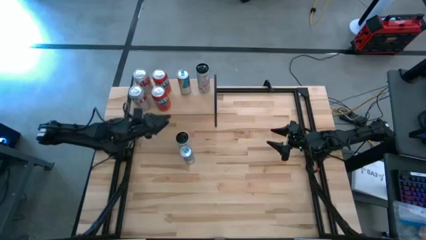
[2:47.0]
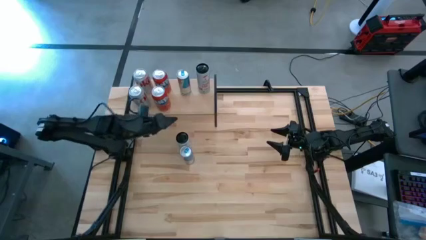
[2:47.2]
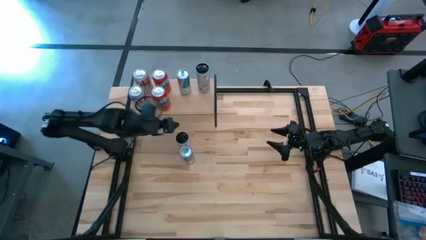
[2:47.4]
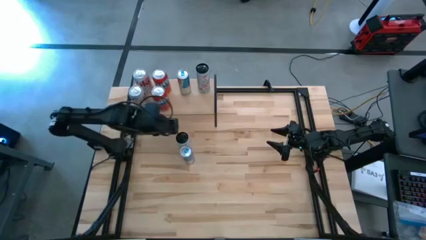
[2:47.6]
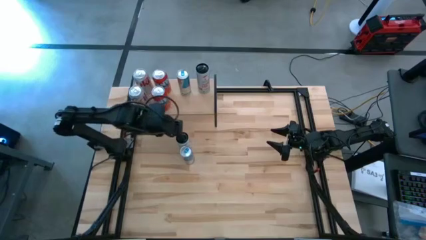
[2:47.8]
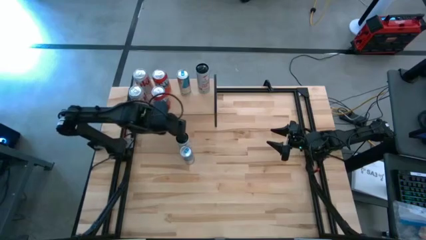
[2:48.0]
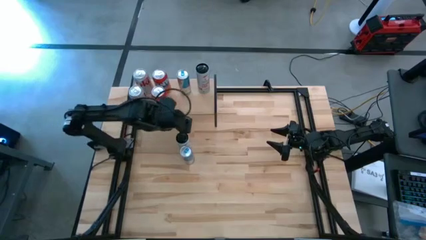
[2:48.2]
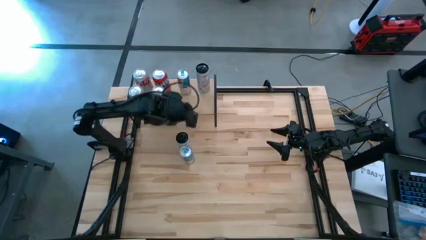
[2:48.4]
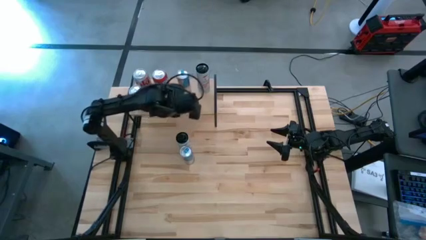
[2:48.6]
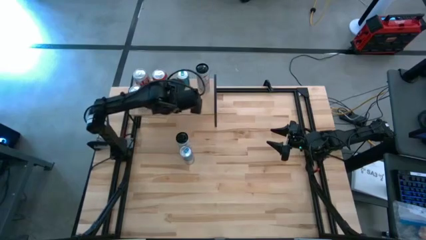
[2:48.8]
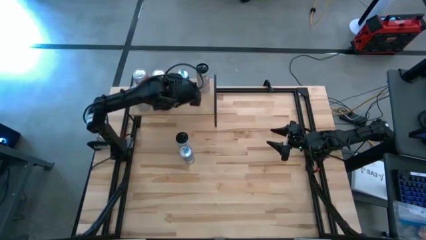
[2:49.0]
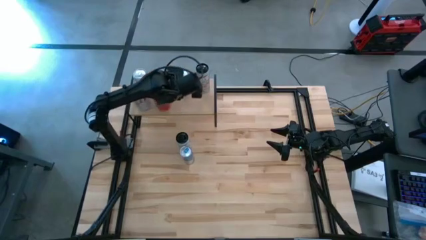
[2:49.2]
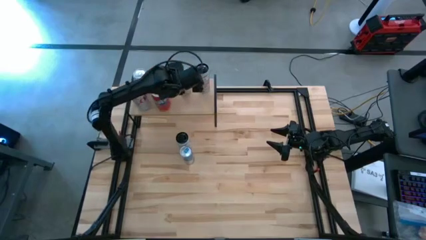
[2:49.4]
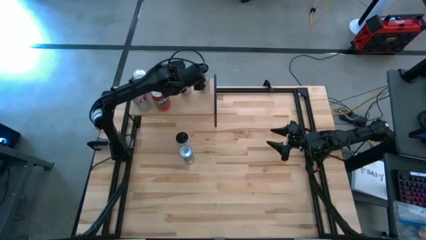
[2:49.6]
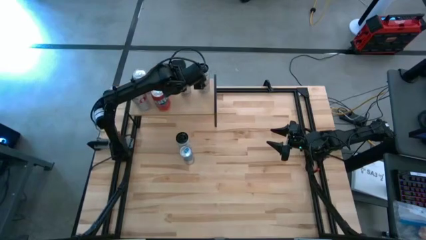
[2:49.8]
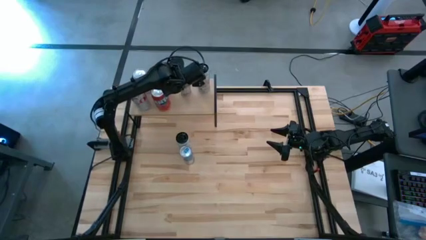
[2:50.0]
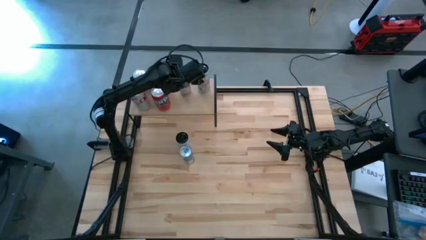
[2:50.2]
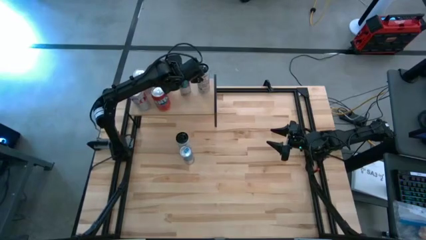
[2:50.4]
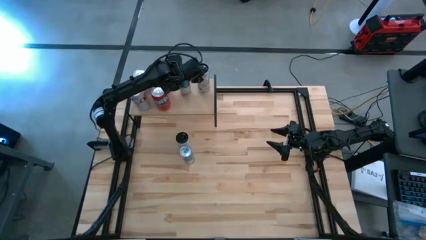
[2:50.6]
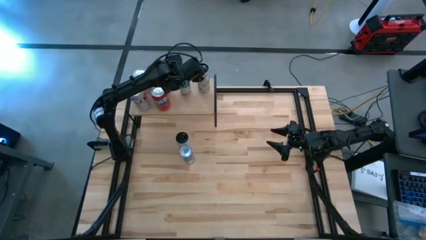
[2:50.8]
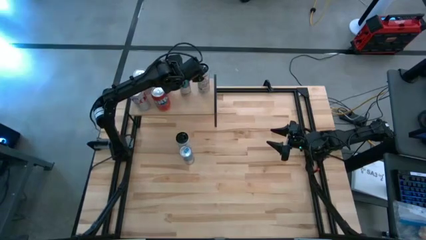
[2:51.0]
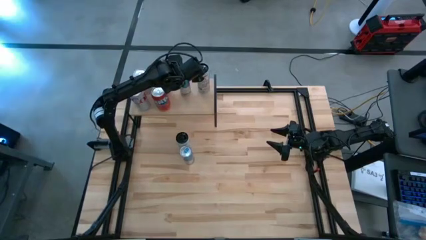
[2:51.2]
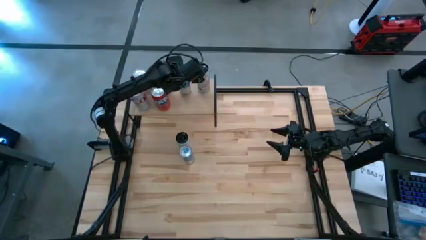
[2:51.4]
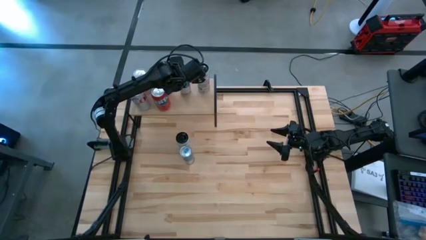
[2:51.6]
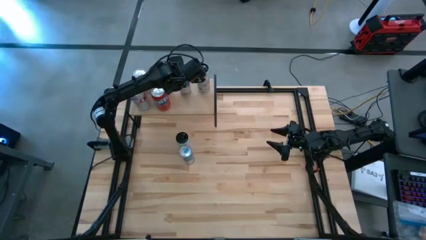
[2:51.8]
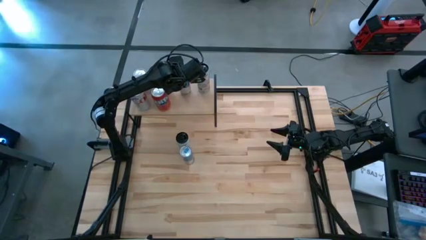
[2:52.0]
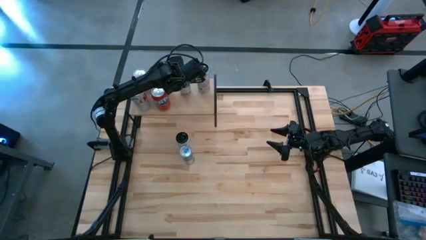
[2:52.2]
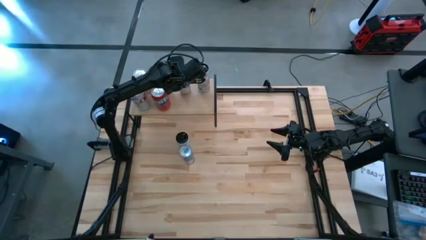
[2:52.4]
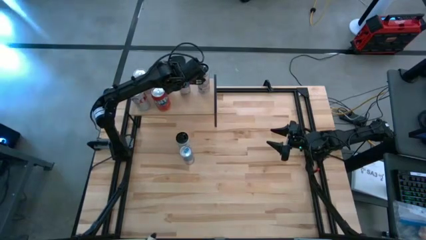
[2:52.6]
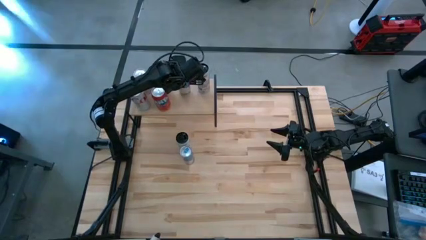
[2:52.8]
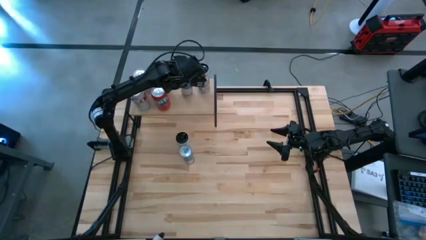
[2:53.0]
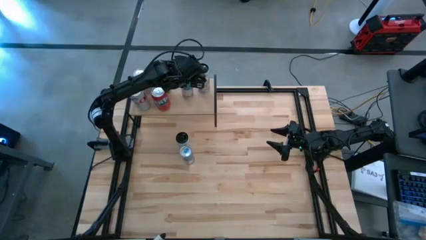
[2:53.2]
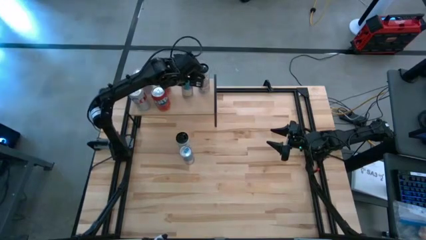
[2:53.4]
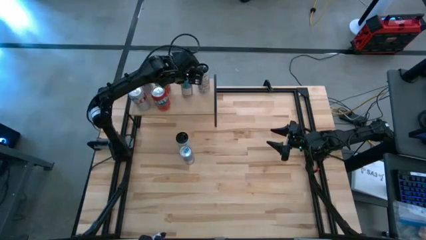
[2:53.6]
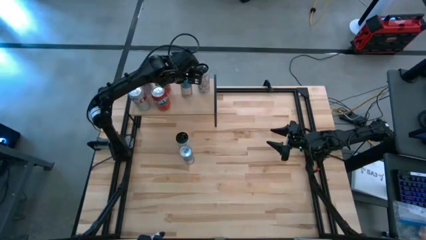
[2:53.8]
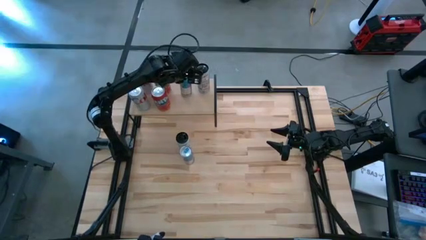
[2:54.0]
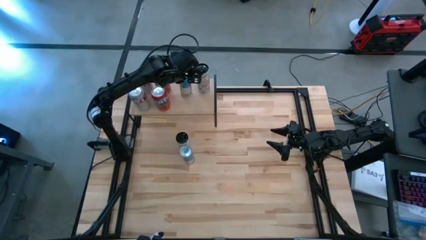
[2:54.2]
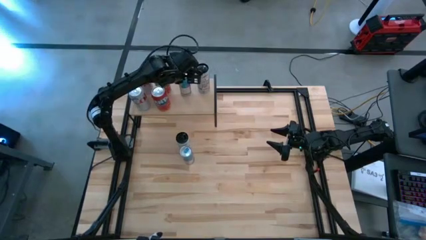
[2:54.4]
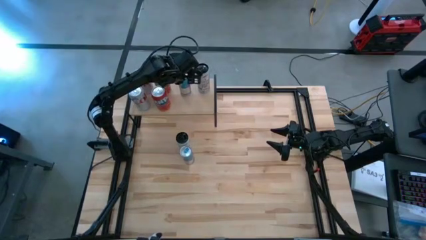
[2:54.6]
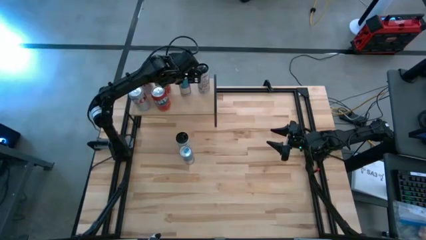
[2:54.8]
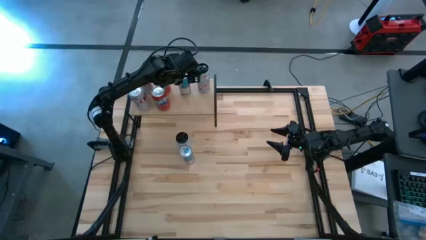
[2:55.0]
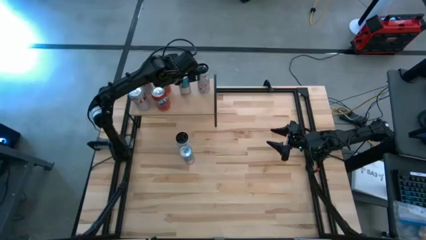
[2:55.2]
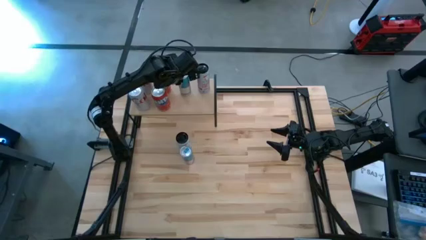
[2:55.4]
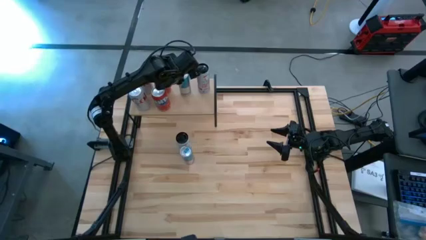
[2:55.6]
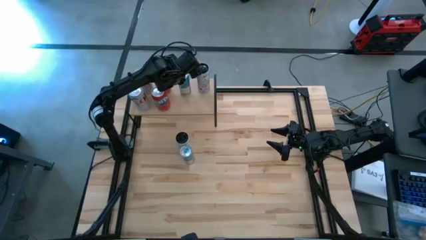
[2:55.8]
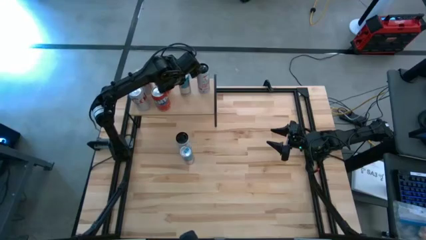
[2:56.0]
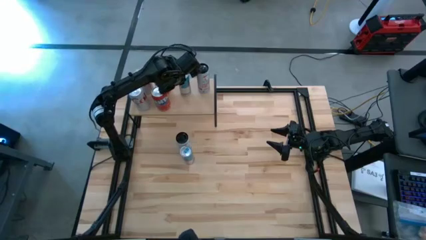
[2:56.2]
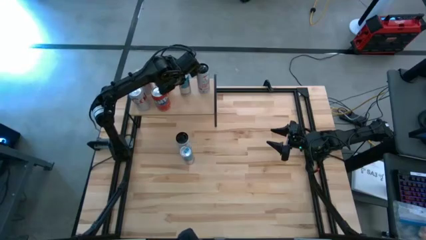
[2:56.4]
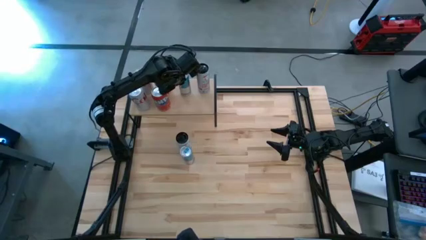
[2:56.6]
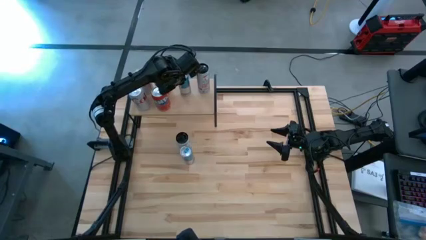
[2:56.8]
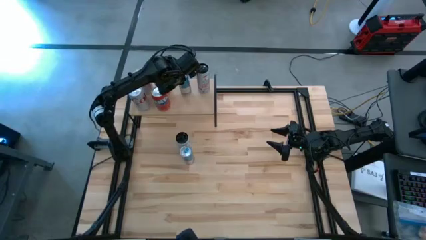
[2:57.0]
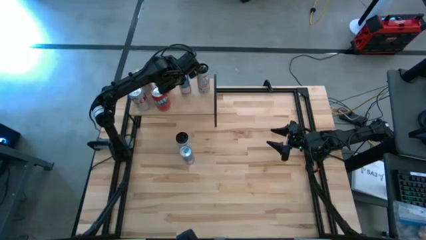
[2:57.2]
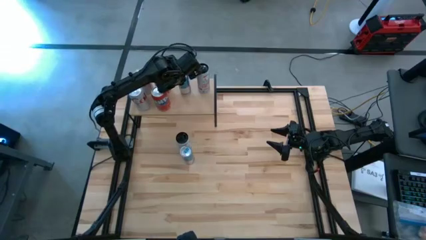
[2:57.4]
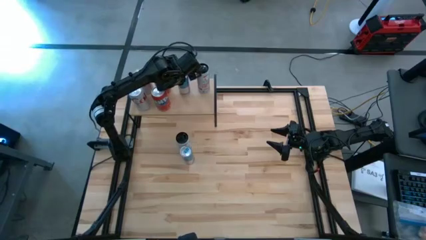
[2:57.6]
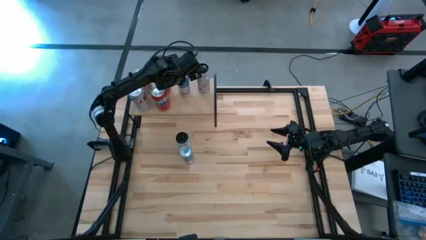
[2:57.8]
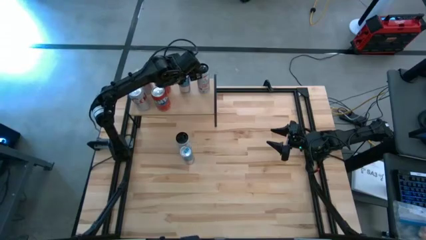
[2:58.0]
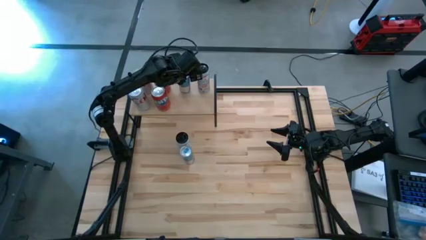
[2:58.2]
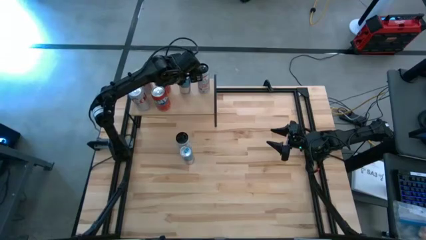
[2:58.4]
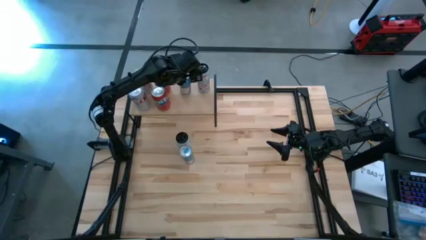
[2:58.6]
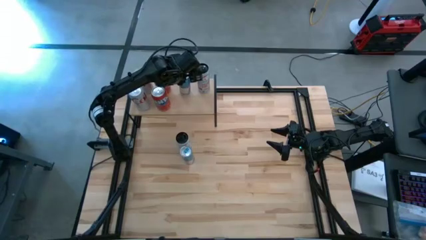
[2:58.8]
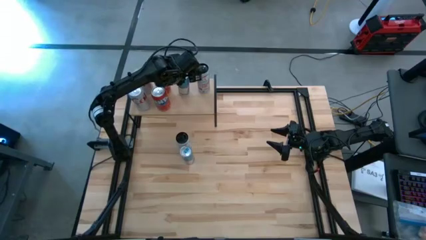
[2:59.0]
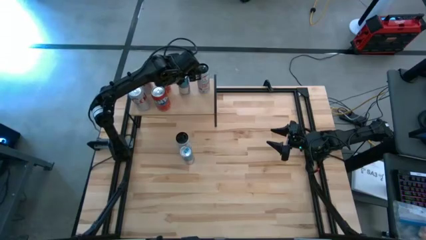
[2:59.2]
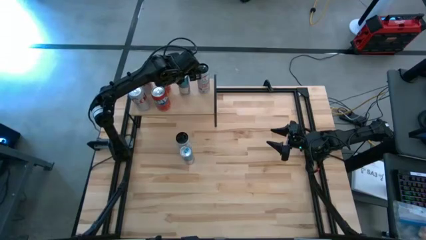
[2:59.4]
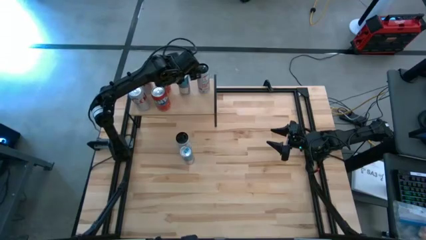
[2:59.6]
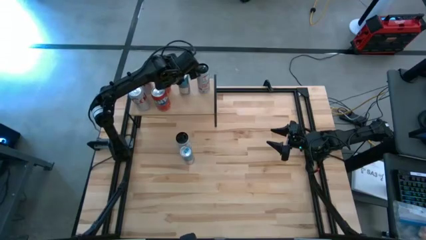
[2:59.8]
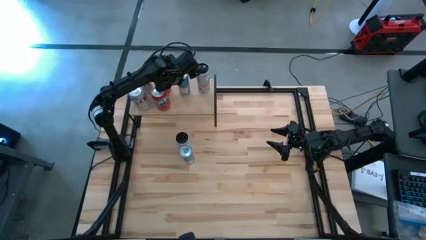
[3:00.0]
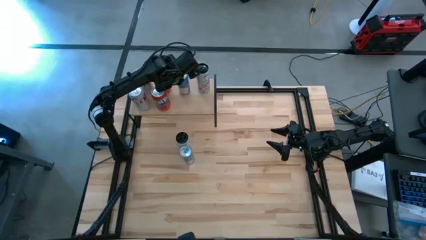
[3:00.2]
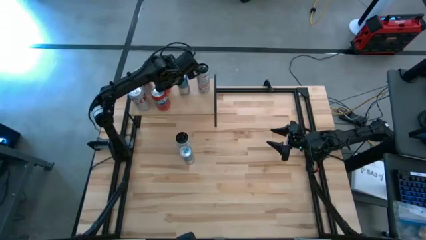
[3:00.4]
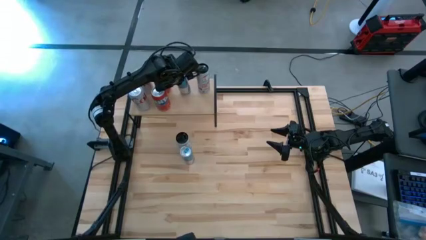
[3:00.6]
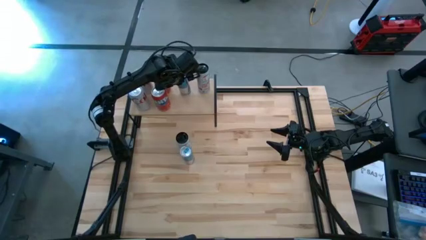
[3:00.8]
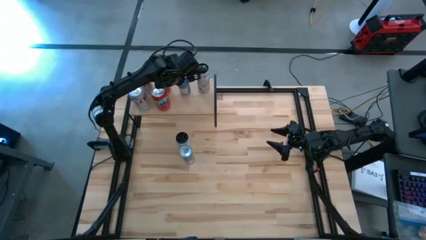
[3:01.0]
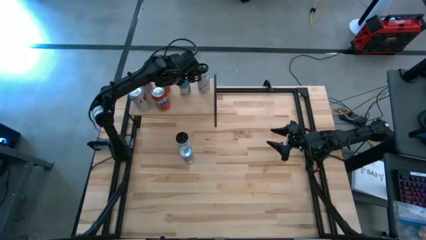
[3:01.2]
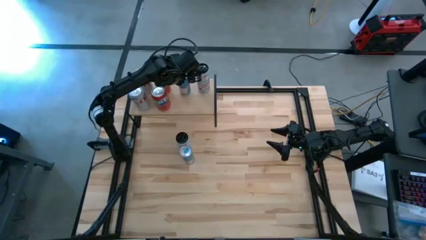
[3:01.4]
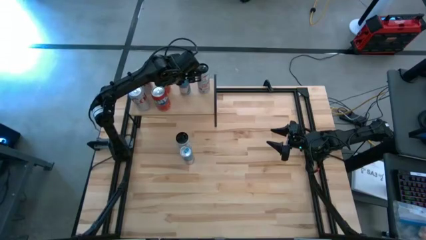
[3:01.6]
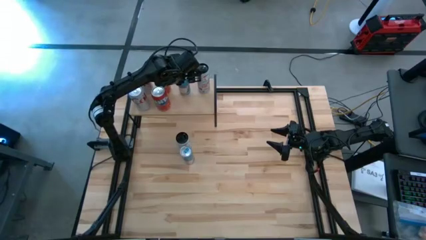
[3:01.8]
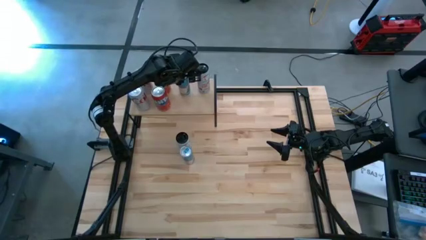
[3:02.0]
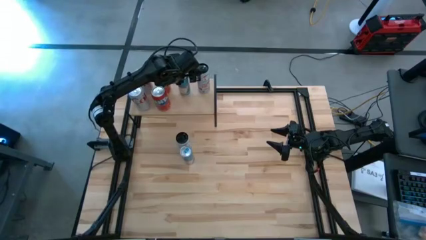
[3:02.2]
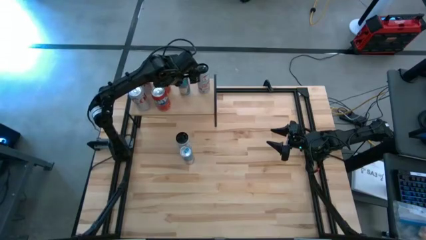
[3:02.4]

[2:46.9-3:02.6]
Task: Place canned beverage on shelf
Put the bottom blue soda can on the shelf
